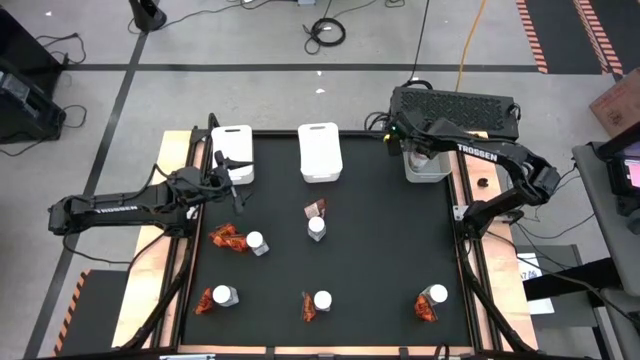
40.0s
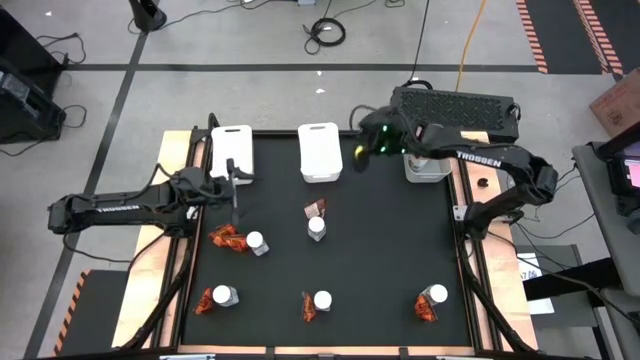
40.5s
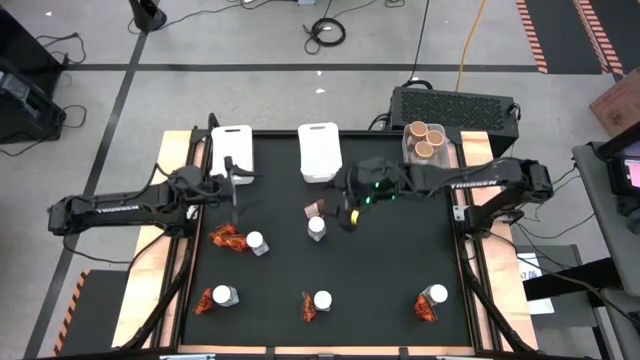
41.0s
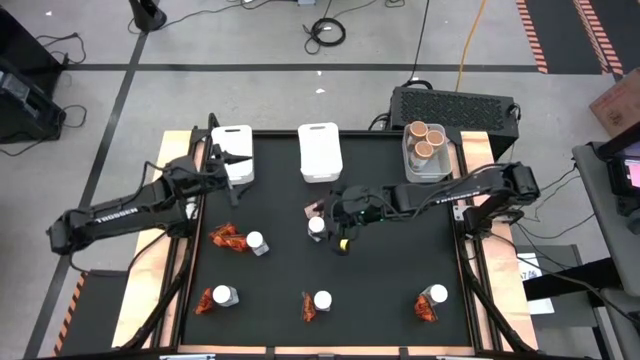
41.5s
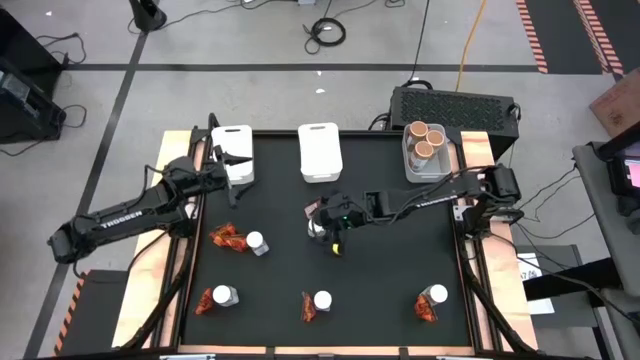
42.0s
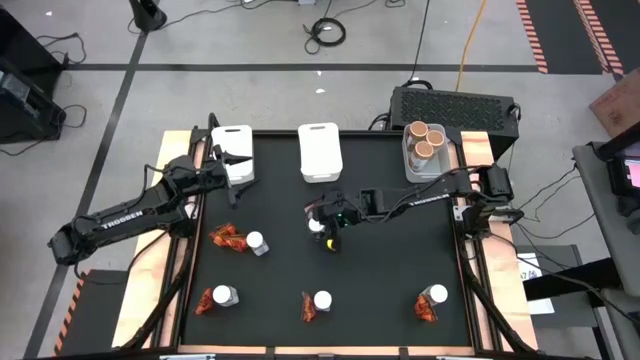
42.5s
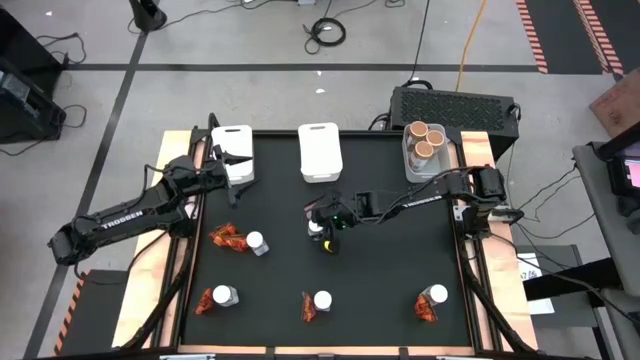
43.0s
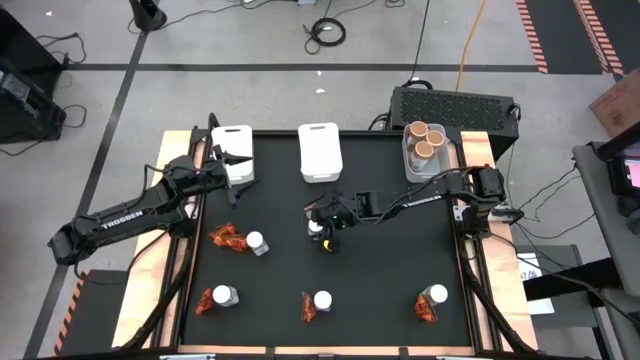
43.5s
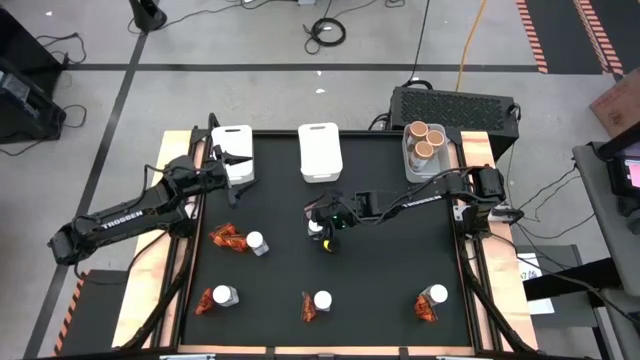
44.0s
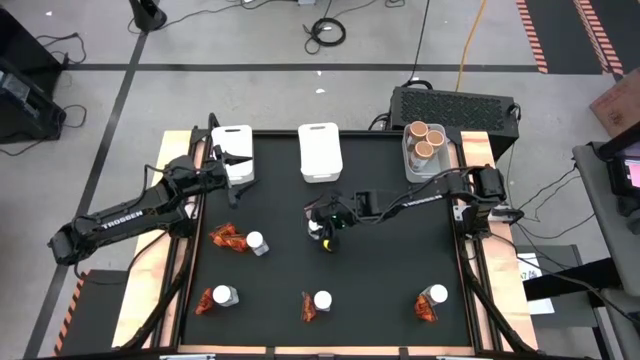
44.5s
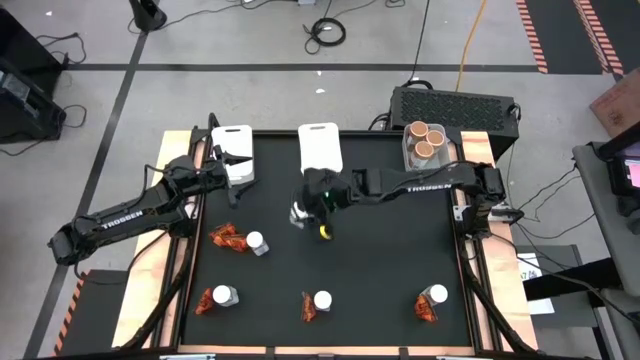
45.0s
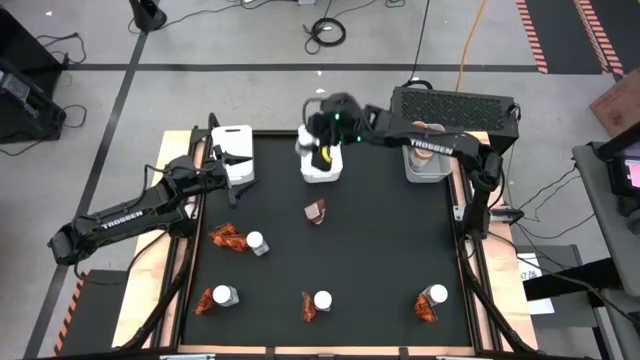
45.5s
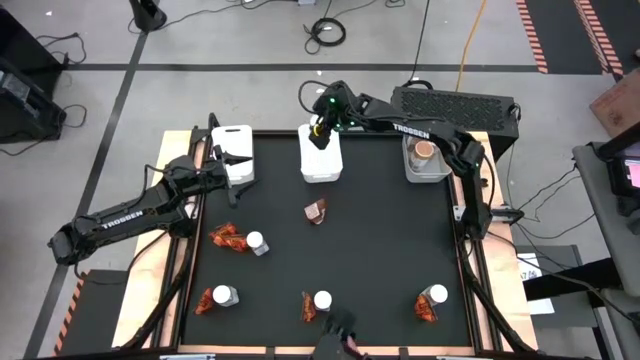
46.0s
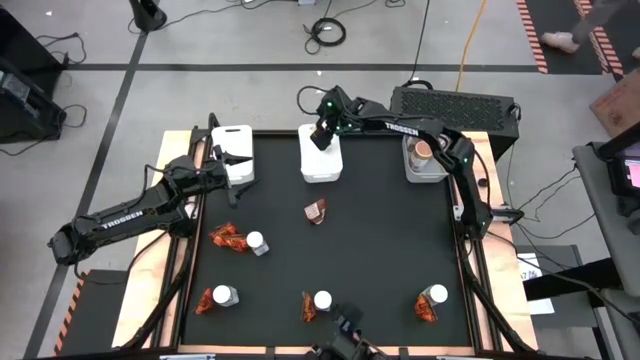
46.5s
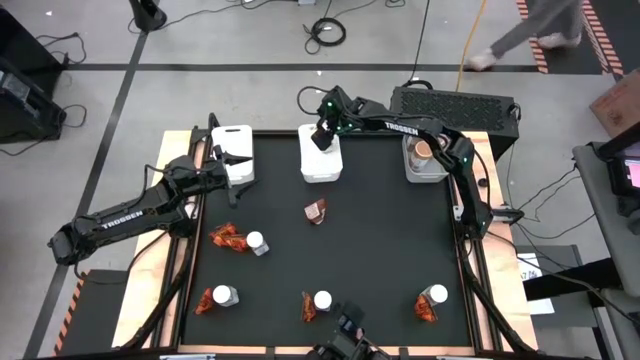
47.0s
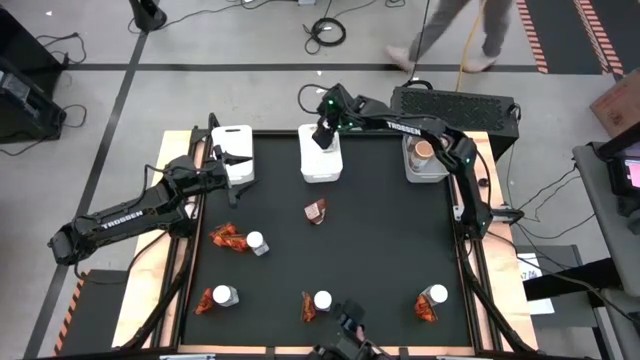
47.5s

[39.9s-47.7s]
Task: Sort spices by type
Put the white seasoning bottle into the right white bin

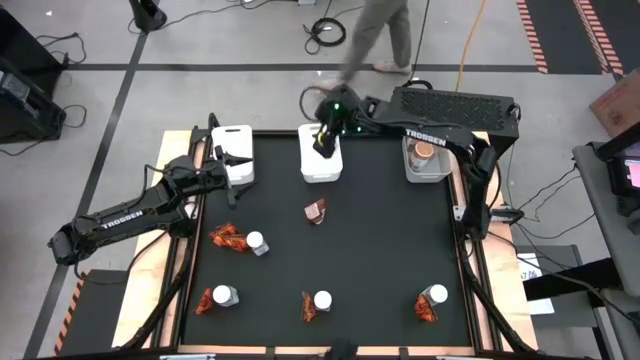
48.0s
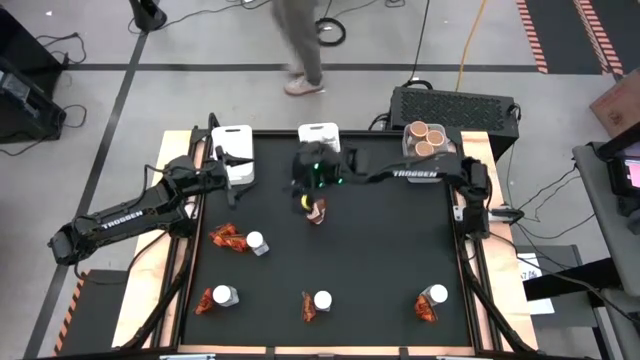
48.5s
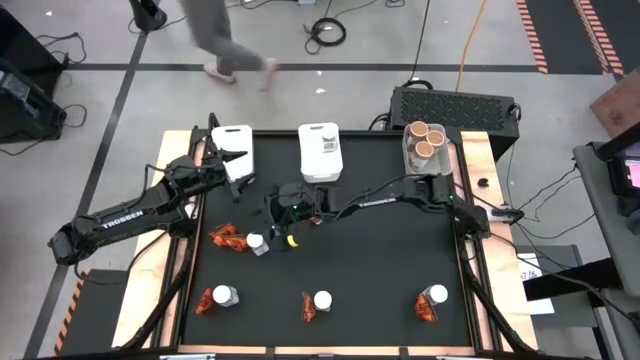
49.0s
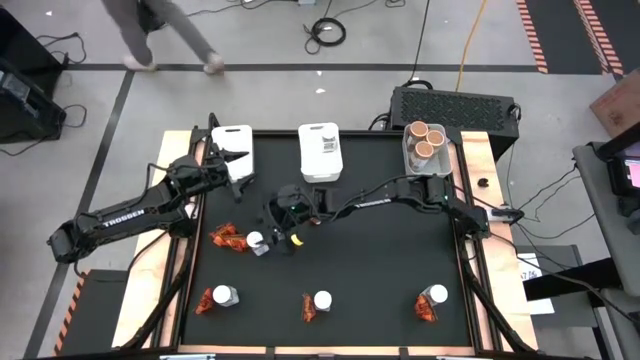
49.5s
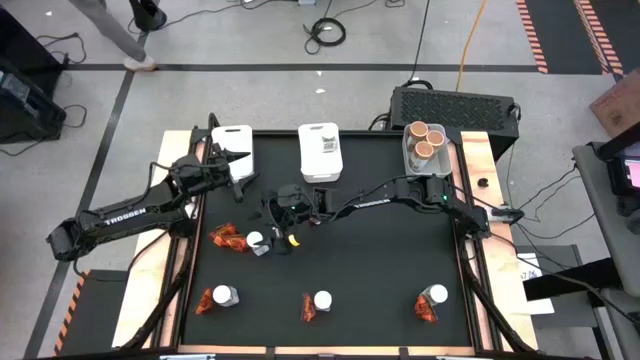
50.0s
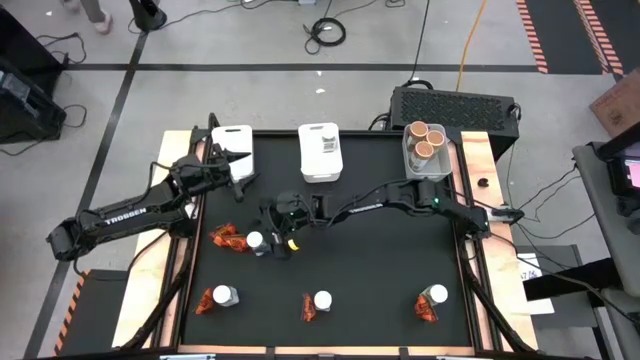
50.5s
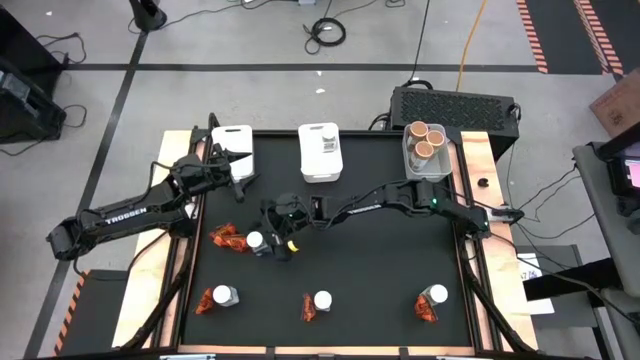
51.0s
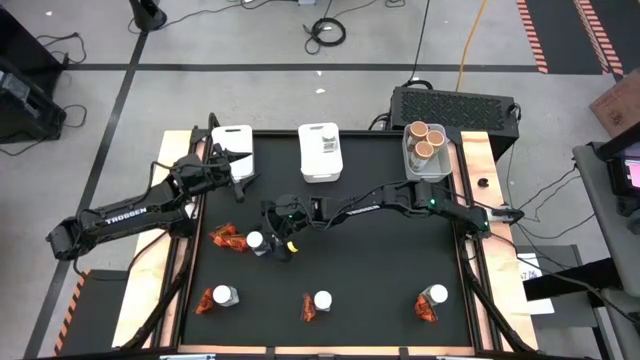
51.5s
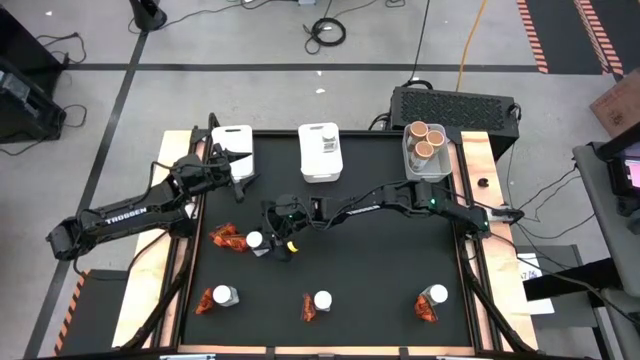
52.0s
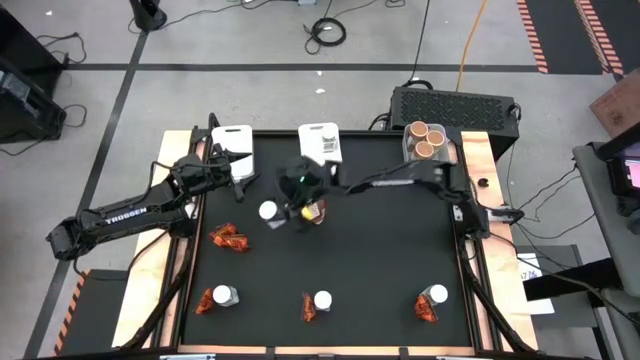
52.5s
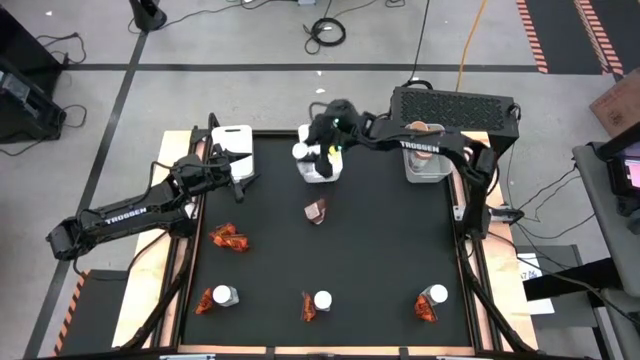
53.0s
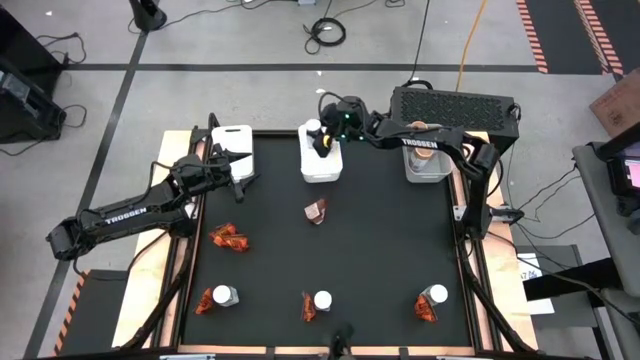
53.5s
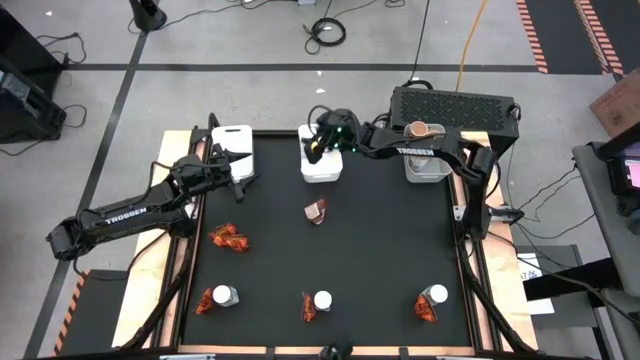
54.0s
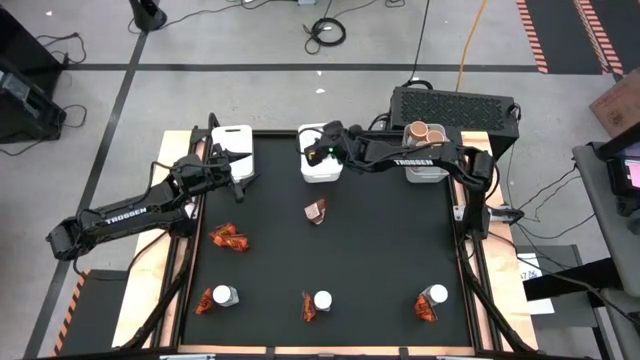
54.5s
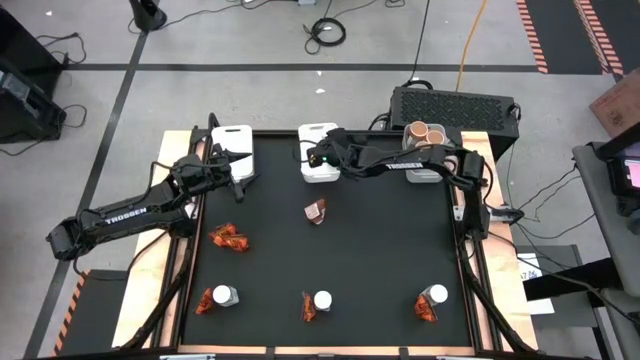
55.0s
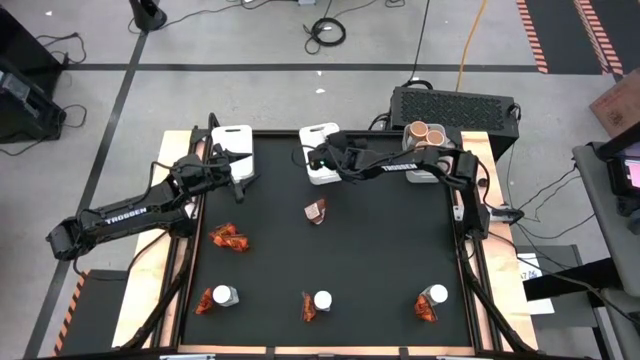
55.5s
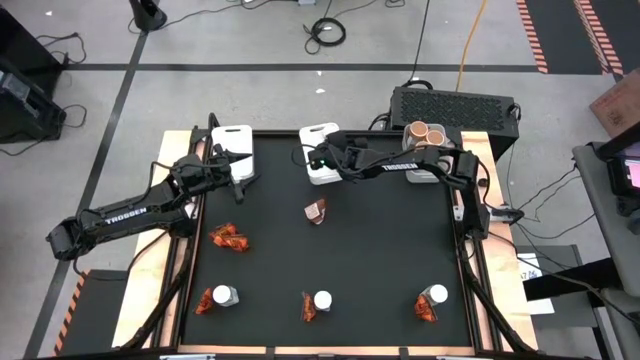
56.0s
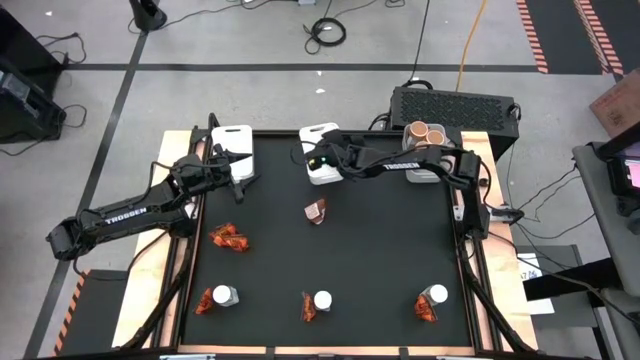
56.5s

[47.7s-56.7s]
Put the white seasoning bottle into the right white bin

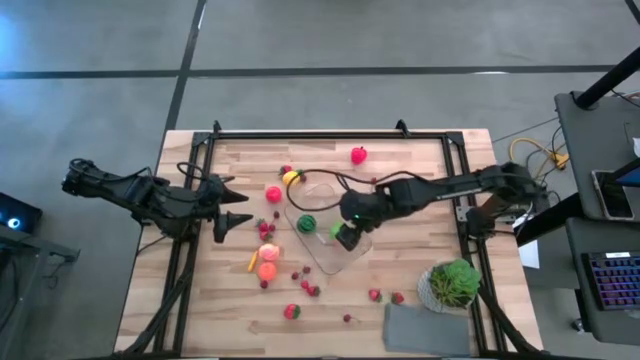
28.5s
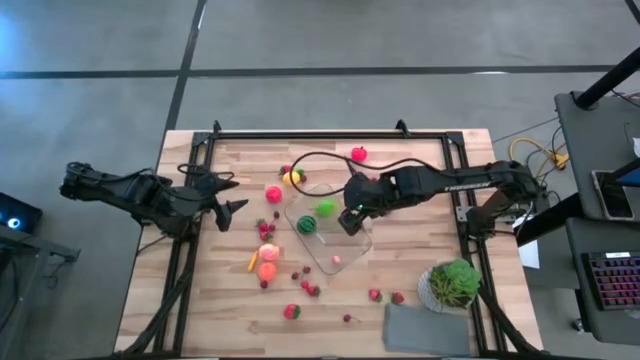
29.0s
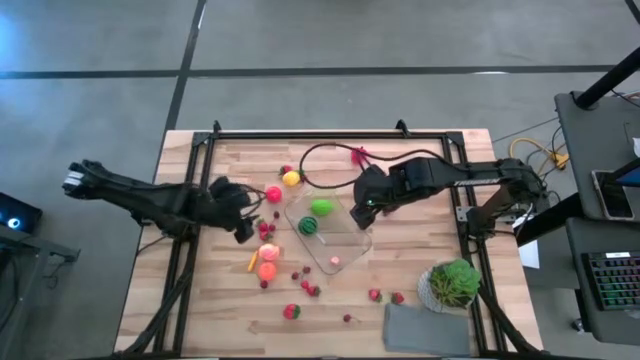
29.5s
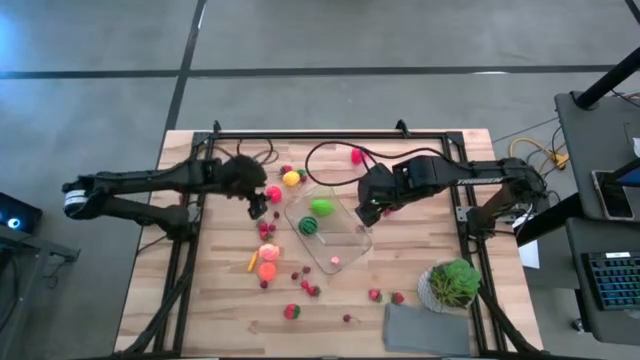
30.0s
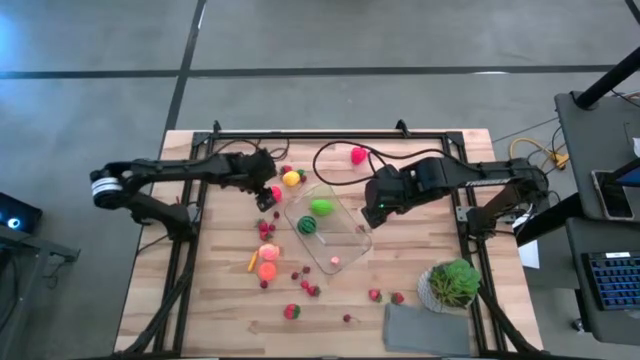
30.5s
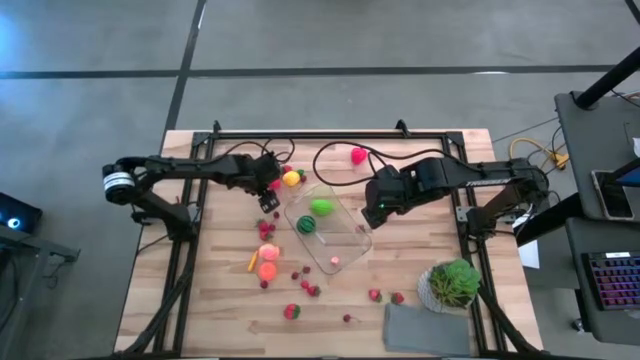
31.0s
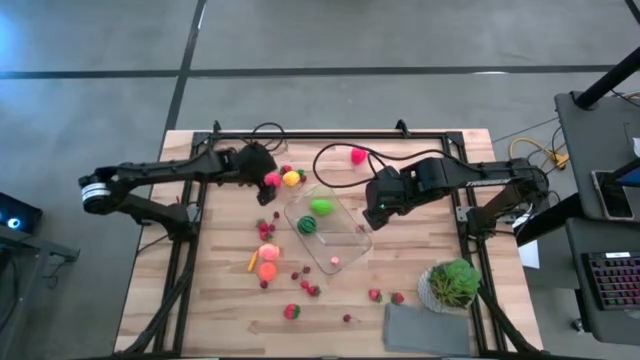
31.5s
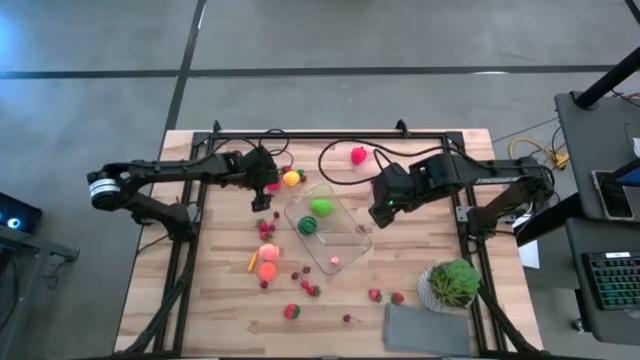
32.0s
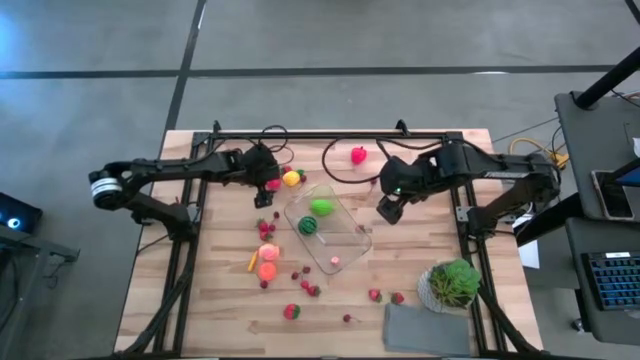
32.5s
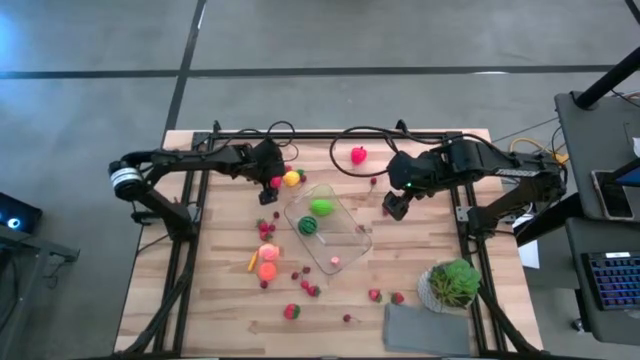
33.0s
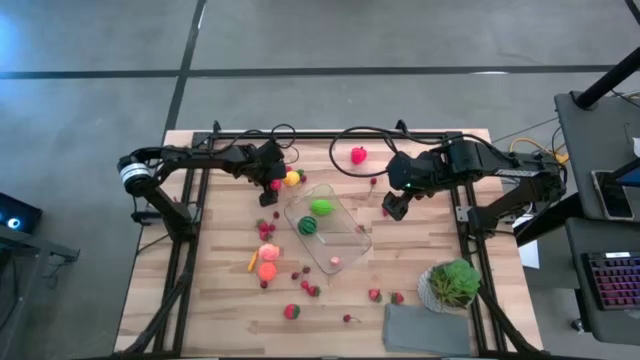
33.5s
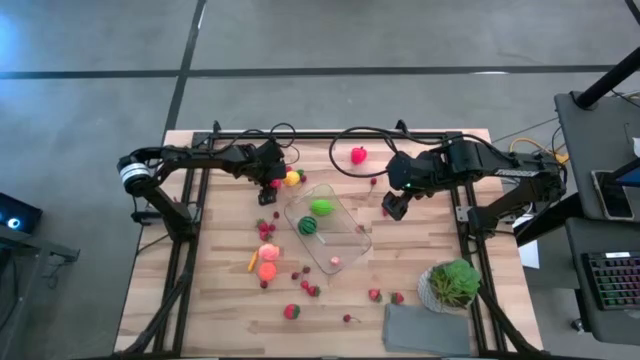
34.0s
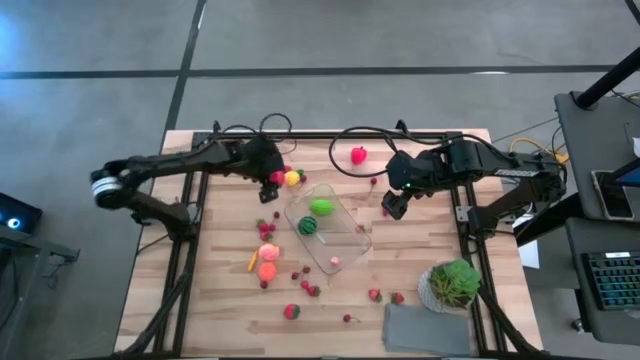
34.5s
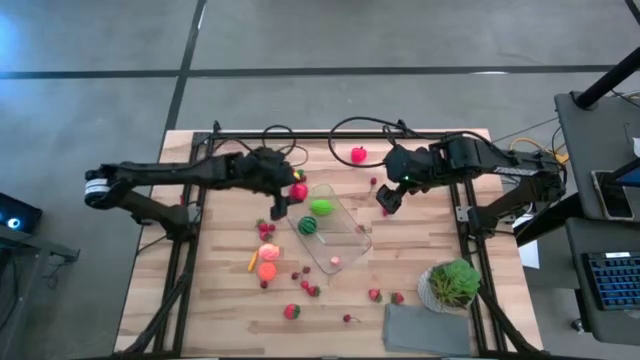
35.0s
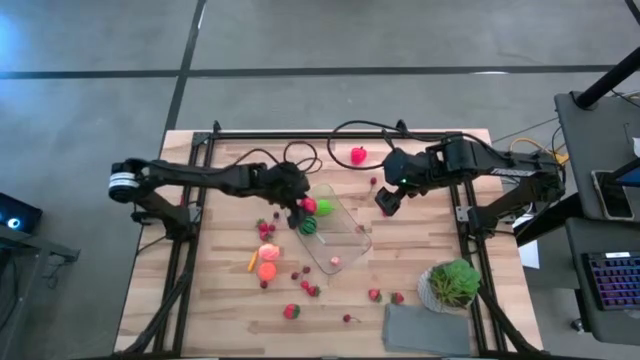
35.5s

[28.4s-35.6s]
Task: Pick and placing Produce into tupperware
Put the red tomato into the transparent bin
